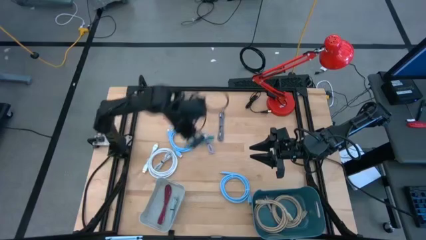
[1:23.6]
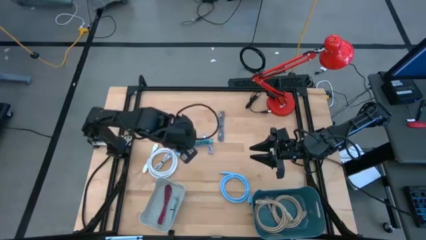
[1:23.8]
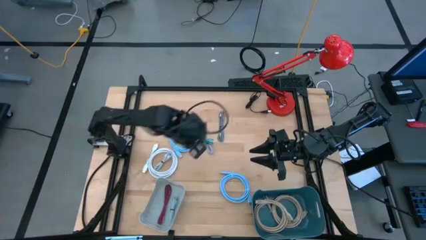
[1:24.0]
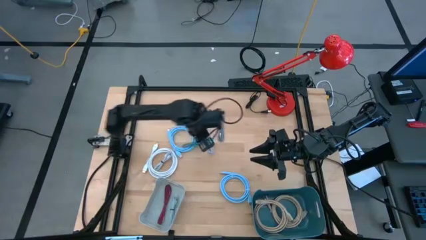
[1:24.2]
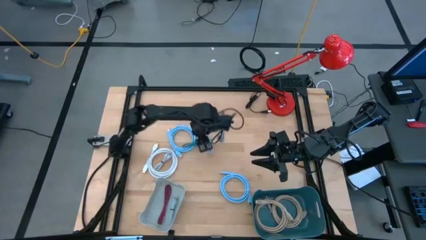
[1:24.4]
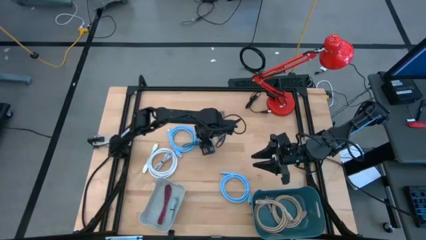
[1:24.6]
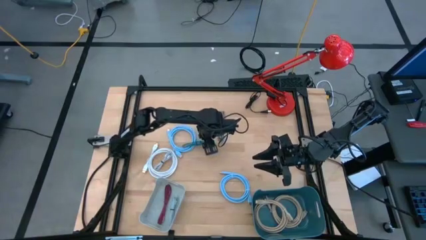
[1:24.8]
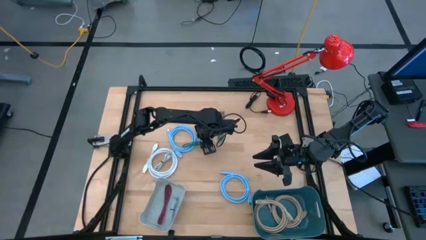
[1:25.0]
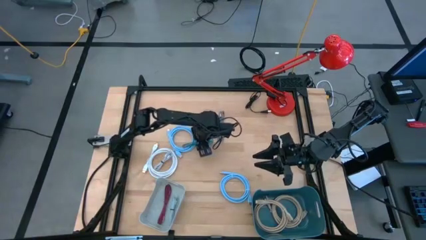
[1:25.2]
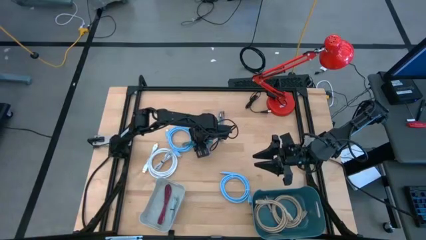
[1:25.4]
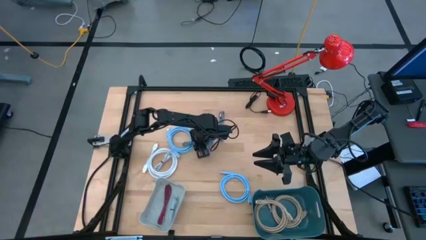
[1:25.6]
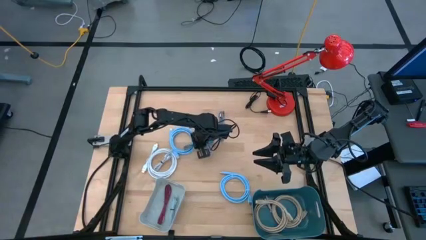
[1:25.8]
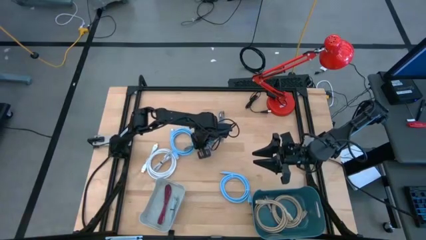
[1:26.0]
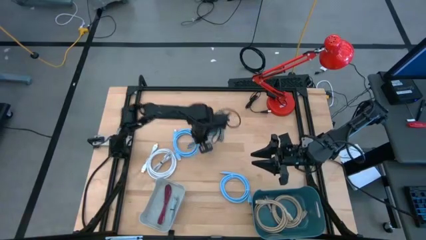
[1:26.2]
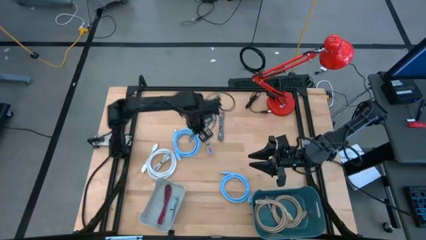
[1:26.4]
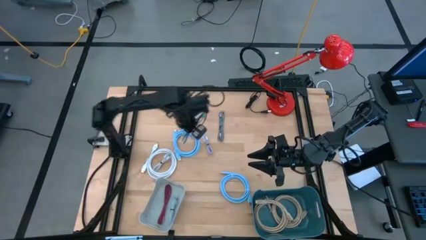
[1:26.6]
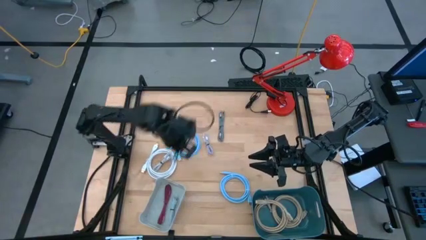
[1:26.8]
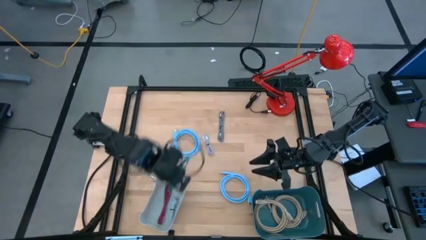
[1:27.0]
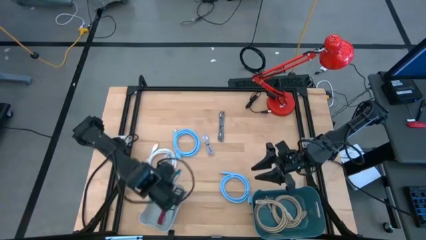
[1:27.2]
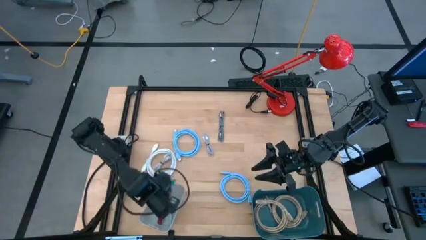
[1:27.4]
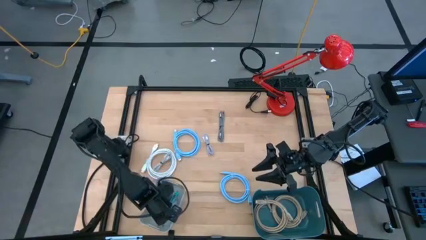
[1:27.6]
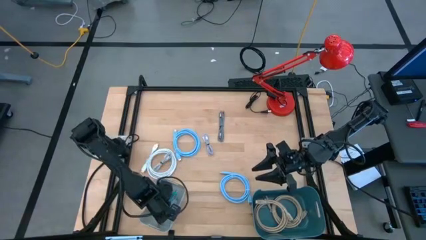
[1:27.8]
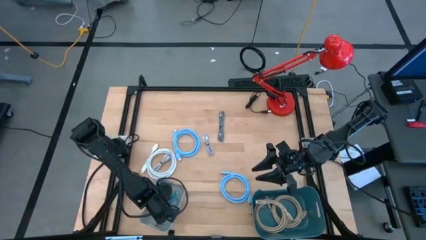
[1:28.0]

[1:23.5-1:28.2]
Task: Pick & Place USB Port
Put the blue patterned charger cable into the gray bin

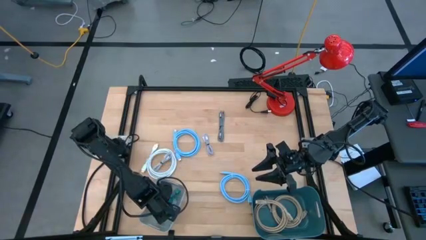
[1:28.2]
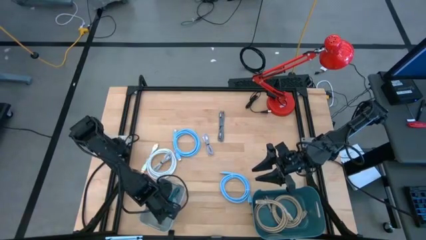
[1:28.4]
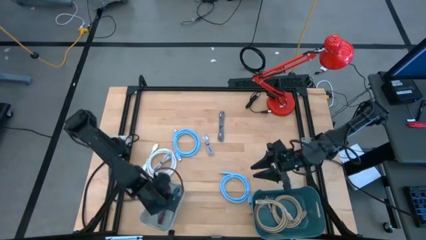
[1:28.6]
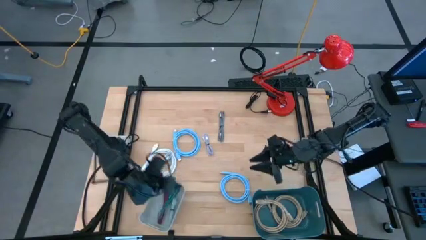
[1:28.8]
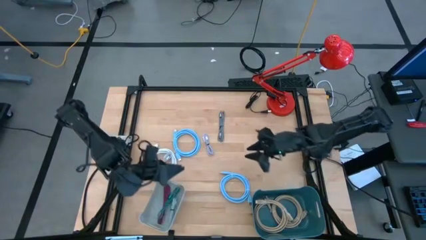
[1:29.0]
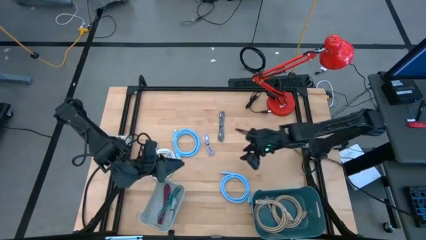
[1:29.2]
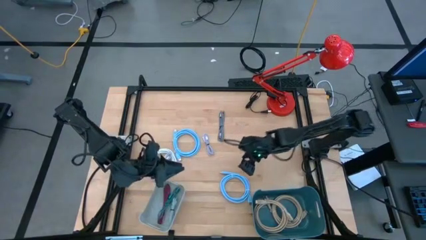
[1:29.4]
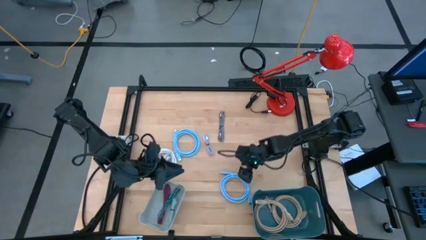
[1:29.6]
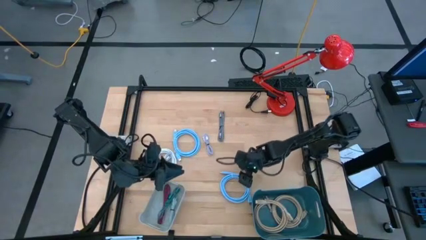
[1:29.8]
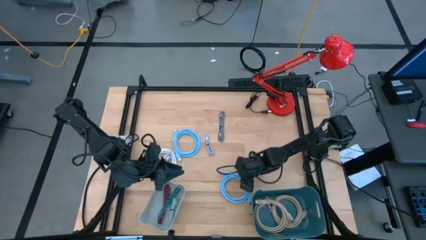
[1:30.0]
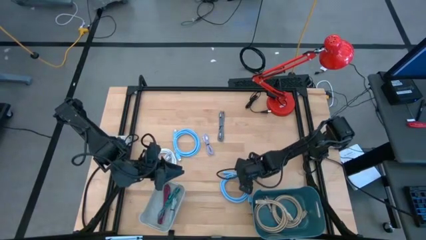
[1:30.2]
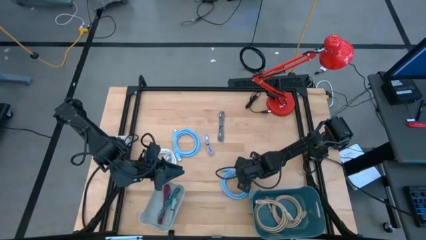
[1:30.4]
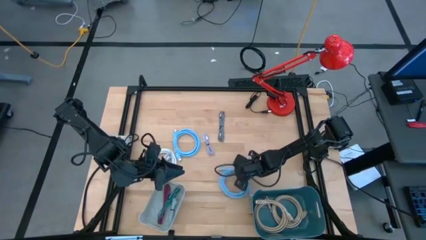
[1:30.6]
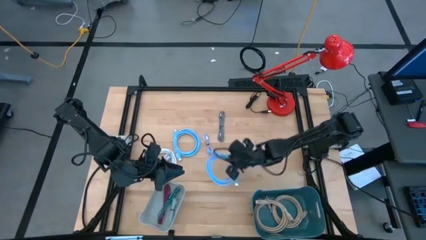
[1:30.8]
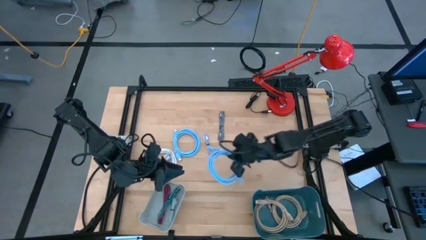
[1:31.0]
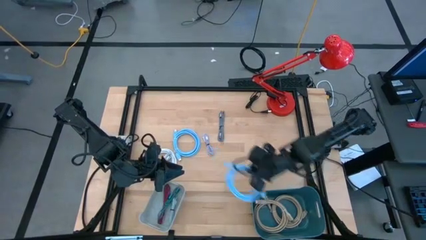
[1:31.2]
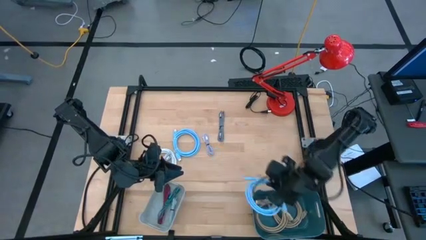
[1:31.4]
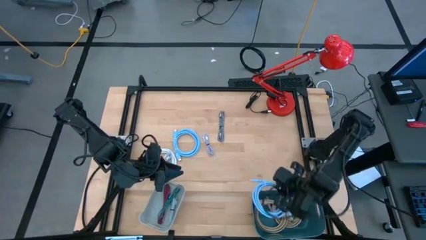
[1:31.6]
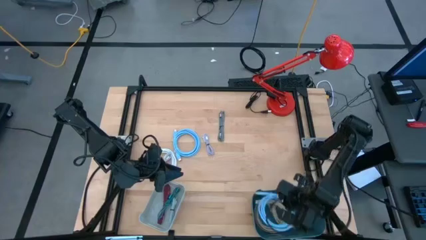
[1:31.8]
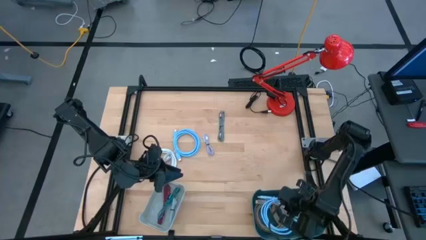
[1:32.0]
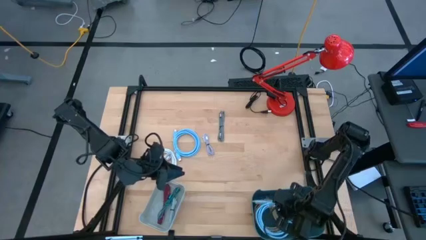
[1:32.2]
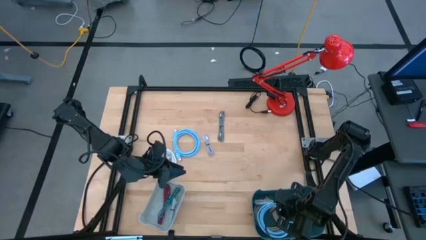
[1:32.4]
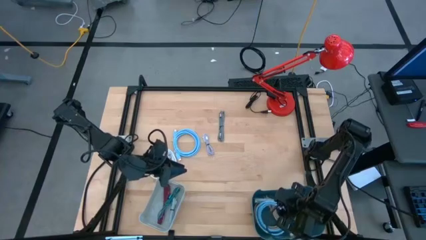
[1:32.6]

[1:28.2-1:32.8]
Put the bottom light blue display cable into the blue bin

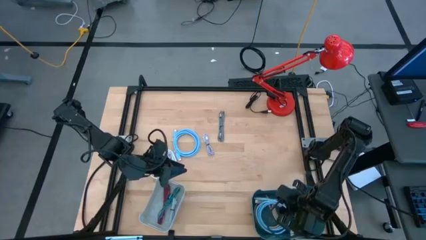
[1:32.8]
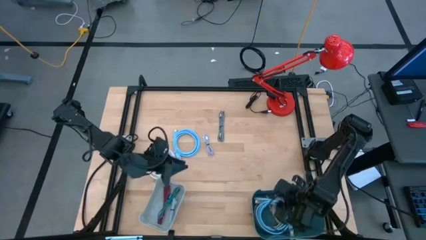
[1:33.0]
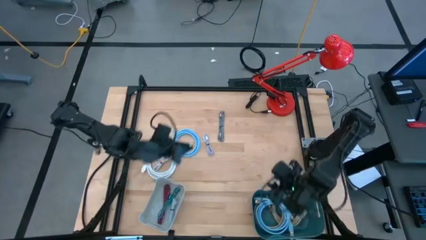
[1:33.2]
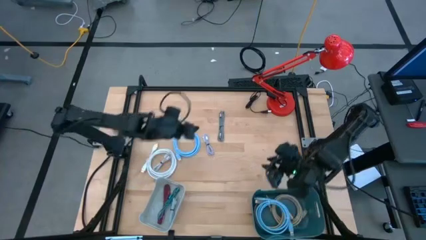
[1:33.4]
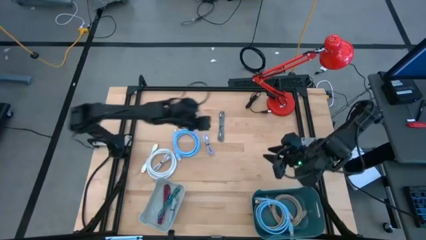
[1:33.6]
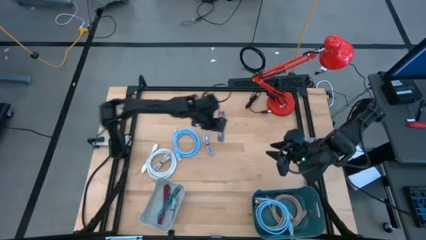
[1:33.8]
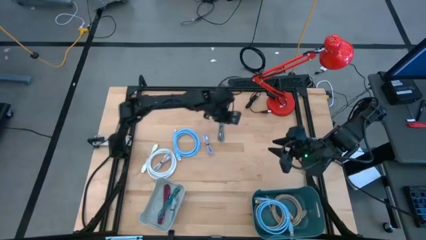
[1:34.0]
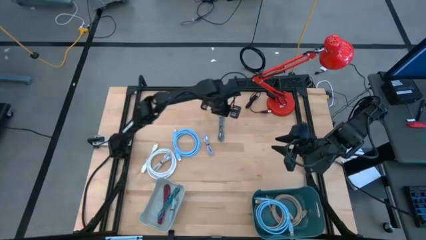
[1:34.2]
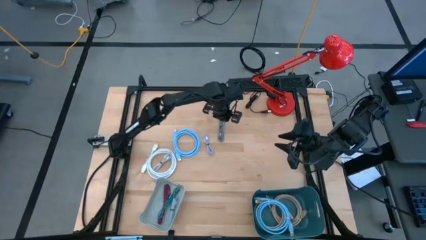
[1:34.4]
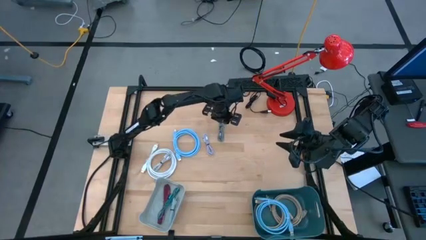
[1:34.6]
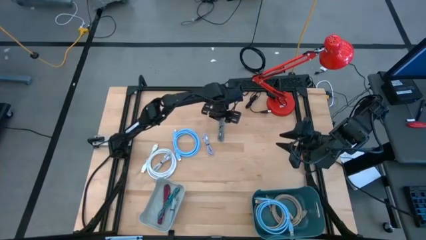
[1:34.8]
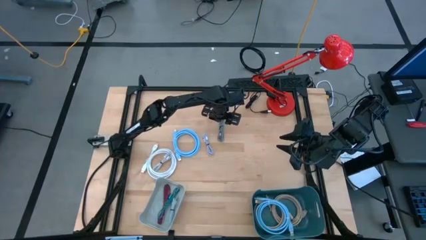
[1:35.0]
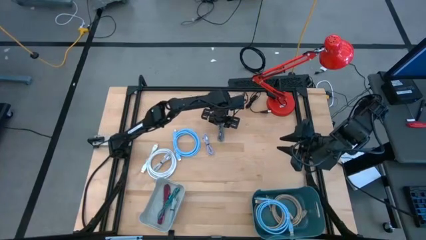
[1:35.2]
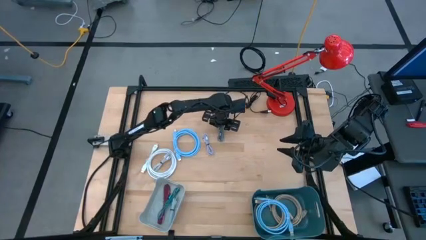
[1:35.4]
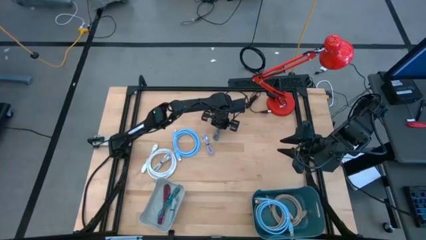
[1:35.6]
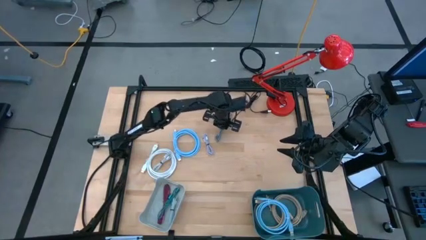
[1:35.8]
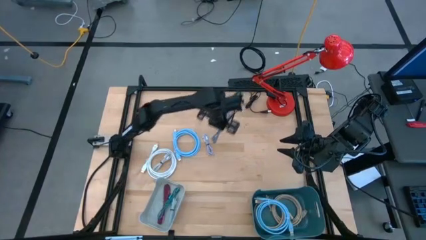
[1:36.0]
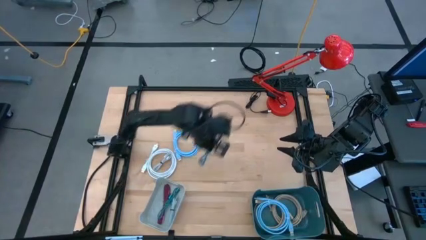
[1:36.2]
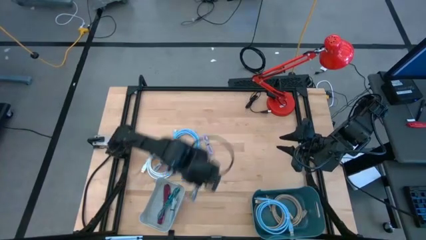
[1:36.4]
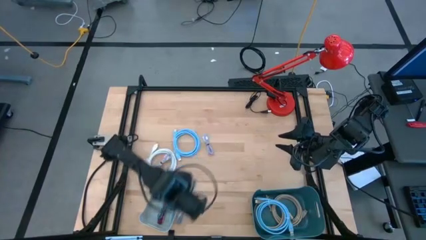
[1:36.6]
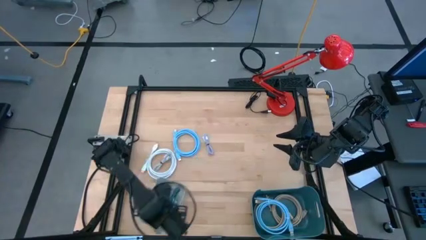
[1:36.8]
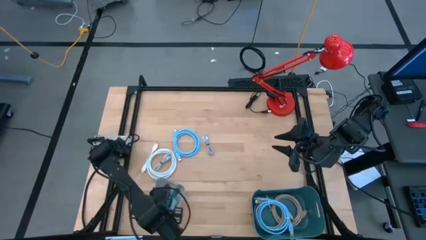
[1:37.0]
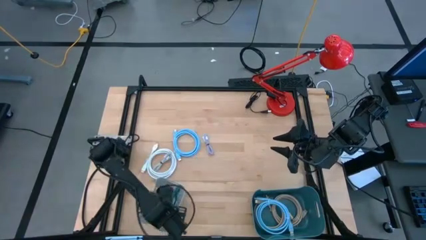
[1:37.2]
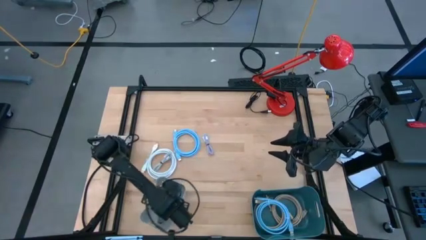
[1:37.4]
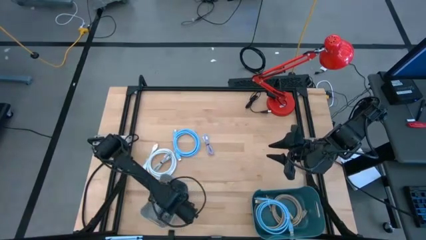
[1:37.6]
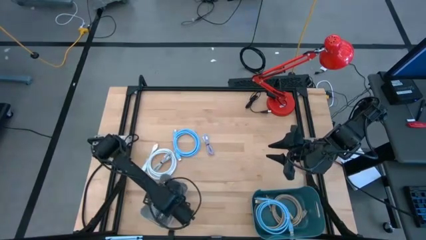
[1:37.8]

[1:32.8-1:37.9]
Put the white patterned charger cable into the gray bin

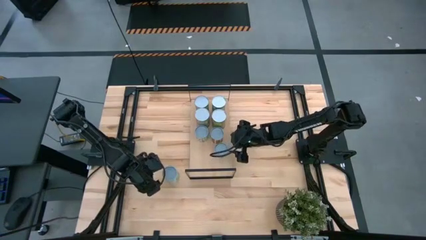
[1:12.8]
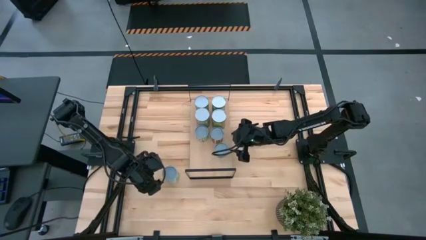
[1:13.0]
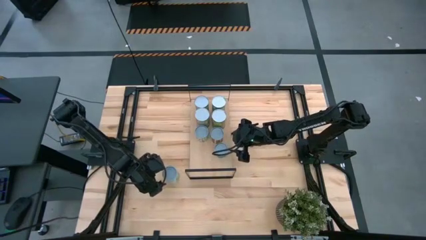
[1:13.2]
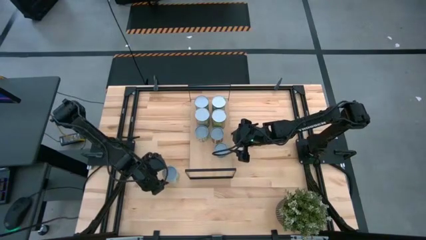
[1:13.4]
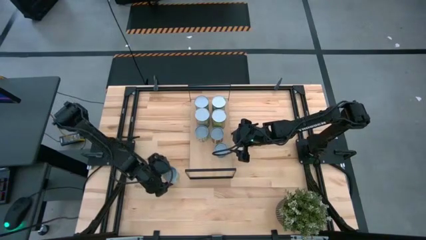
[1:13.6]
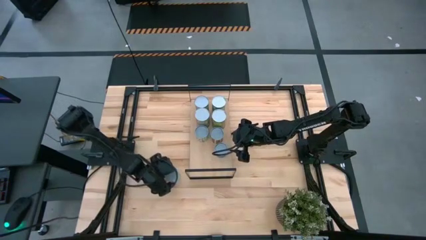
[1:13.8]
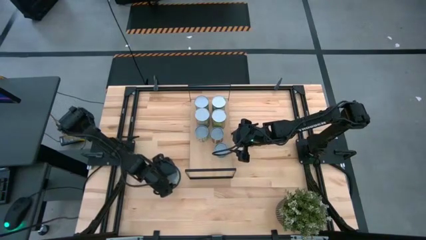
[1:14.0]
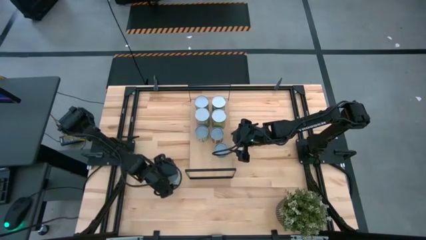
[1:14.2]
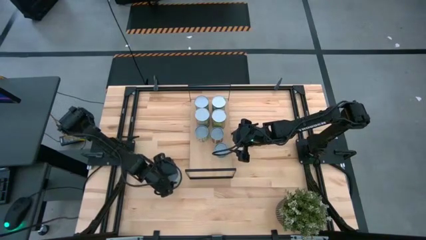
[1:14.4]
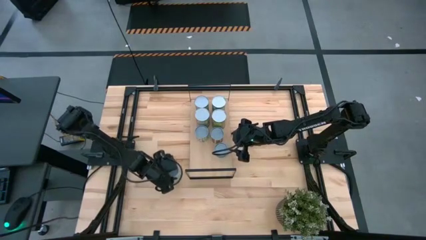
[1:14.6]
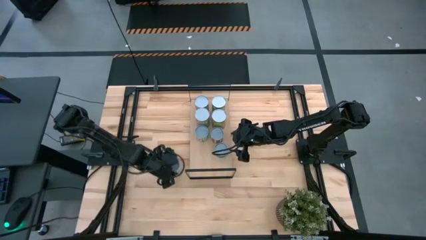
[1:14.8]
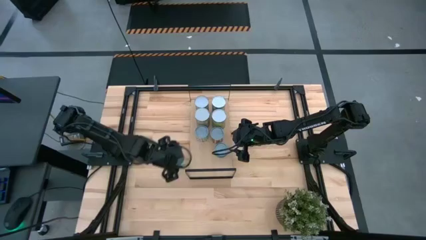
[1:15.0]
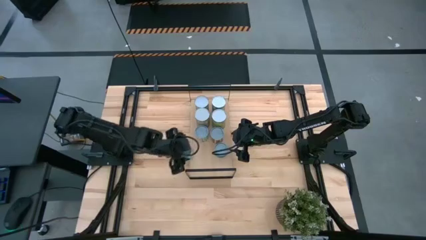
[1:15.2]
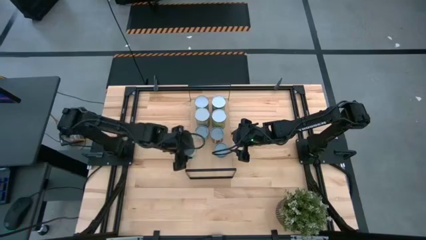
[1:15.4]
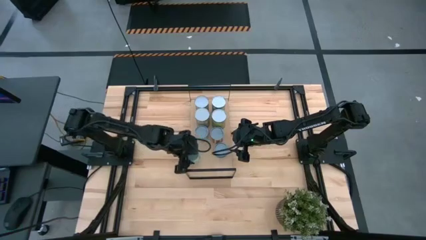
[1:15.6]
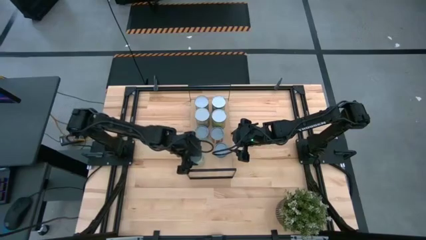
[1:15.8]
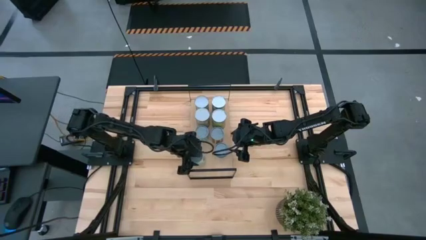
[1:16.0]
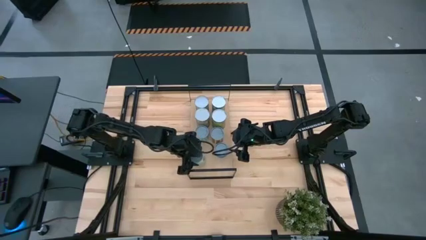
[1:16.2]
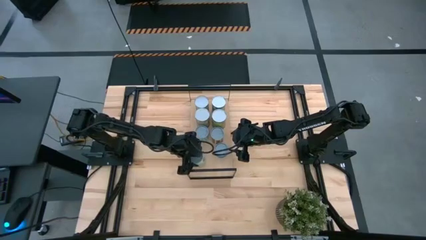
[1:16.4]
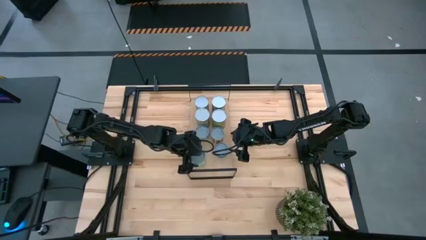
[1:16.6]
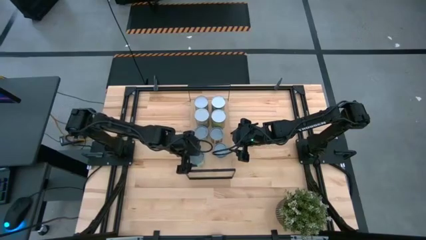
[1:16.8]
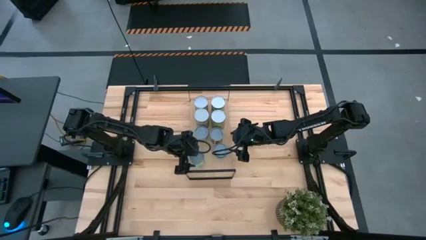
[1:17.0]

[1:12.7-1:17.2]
Task: Pick and place cans onto a shelf
Put the canned mixed vegetables onto the shelf
